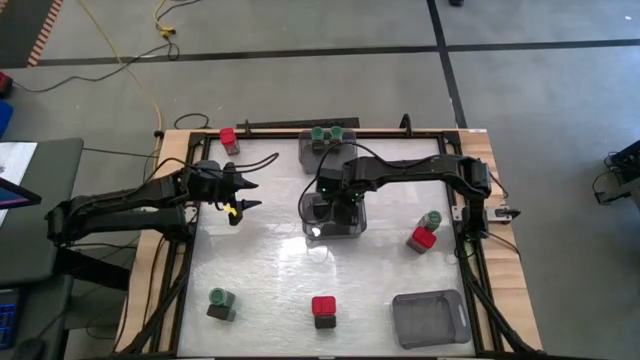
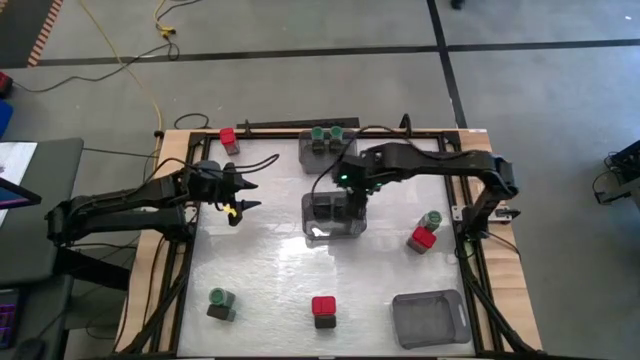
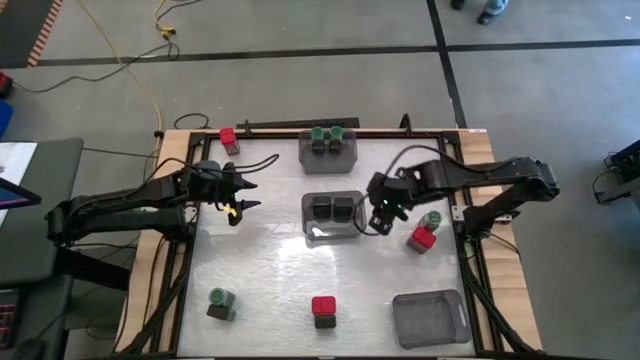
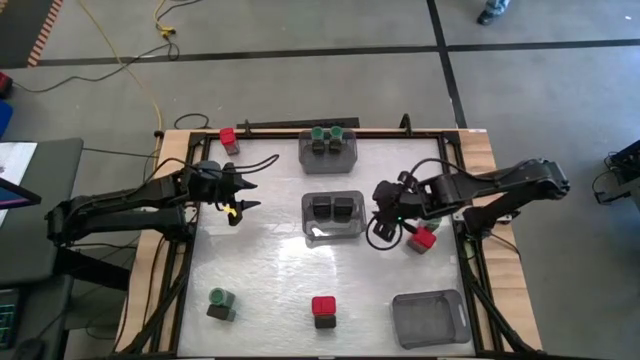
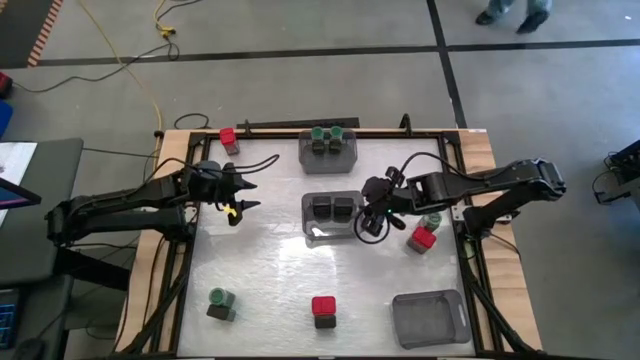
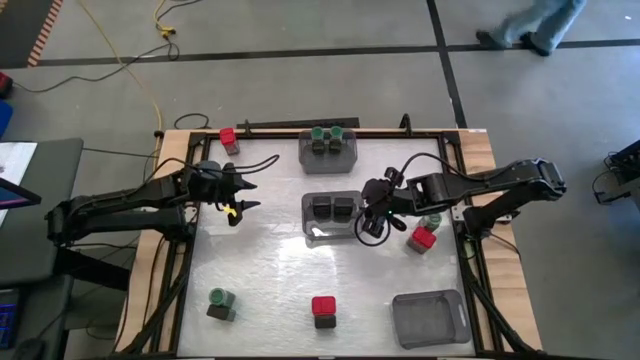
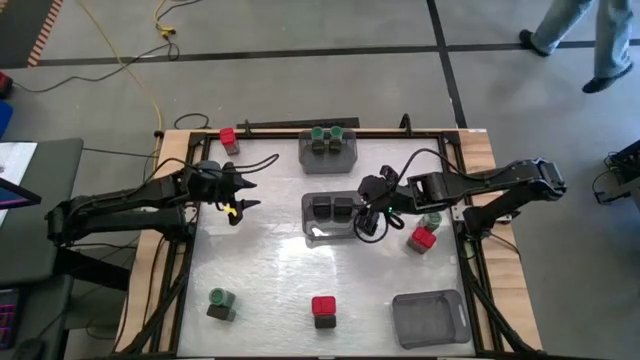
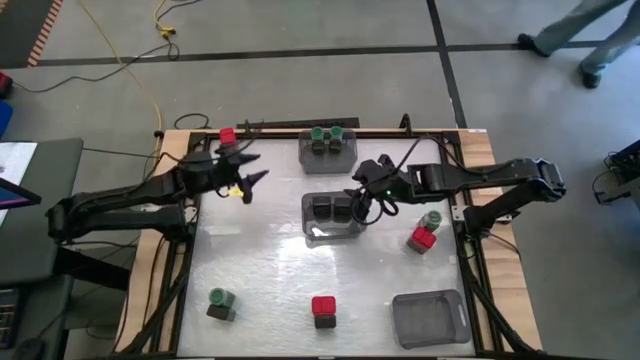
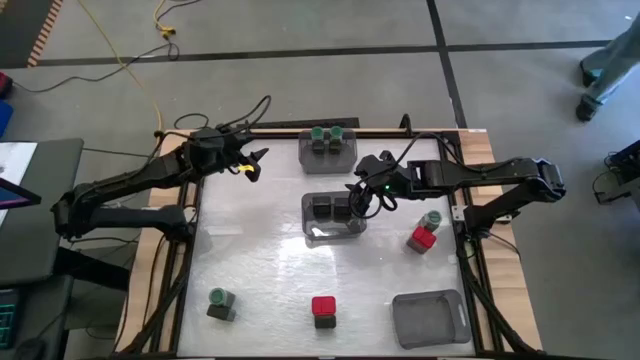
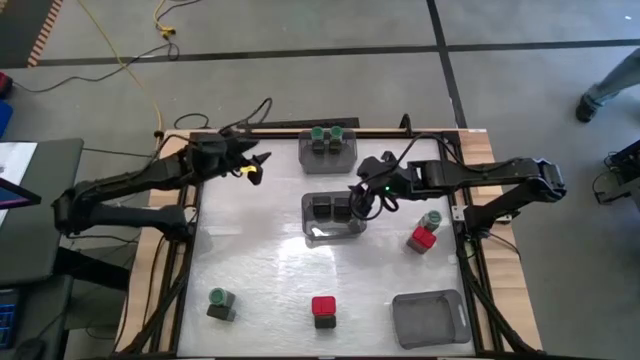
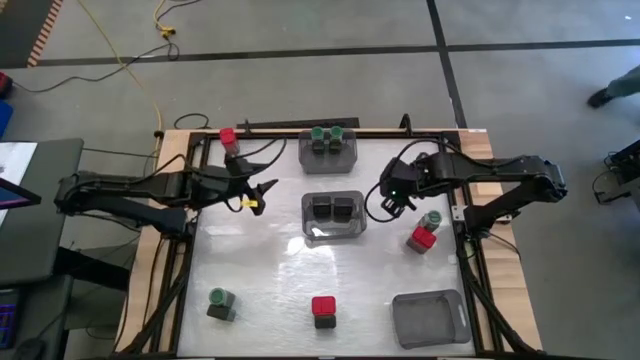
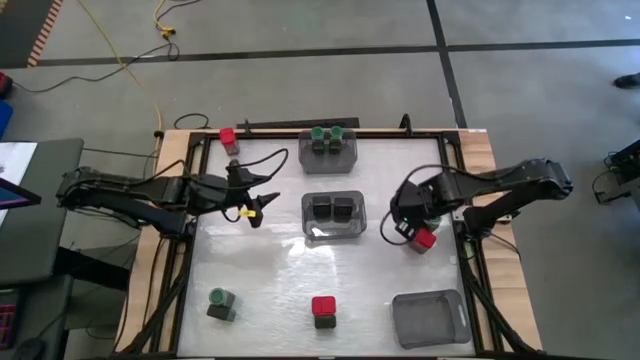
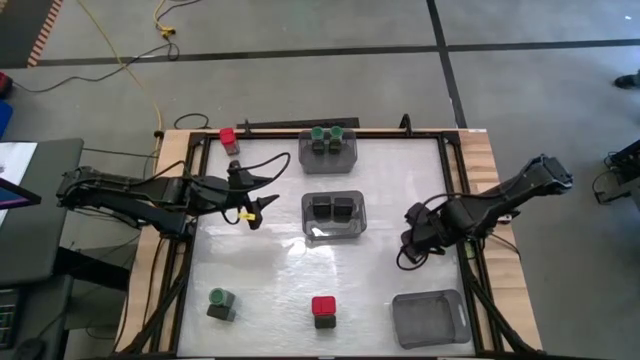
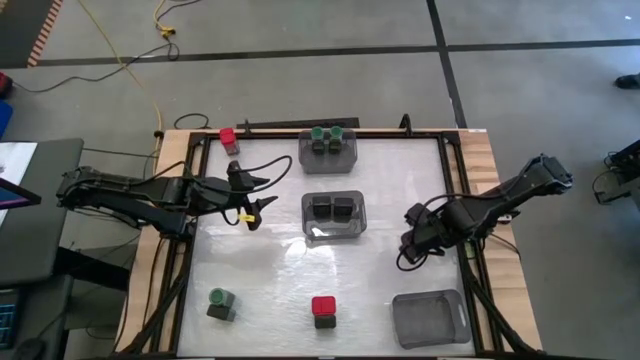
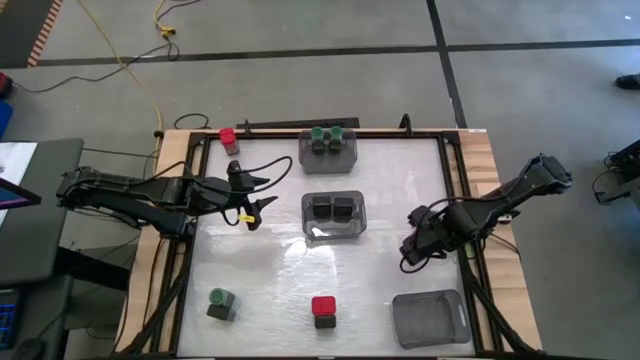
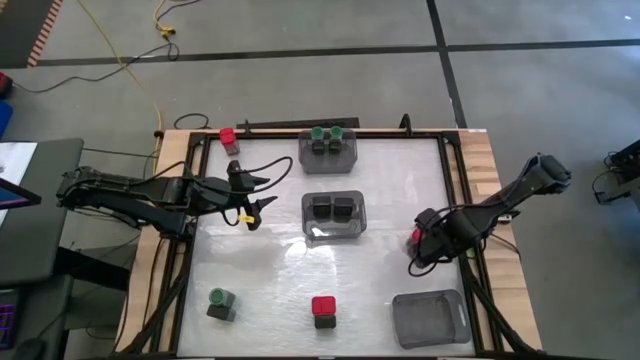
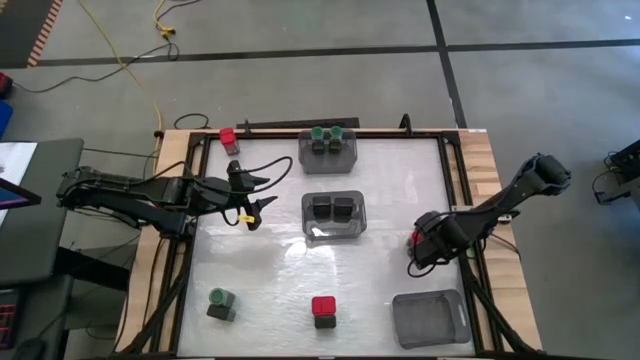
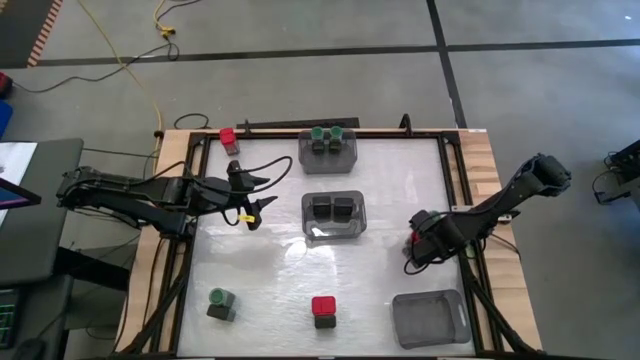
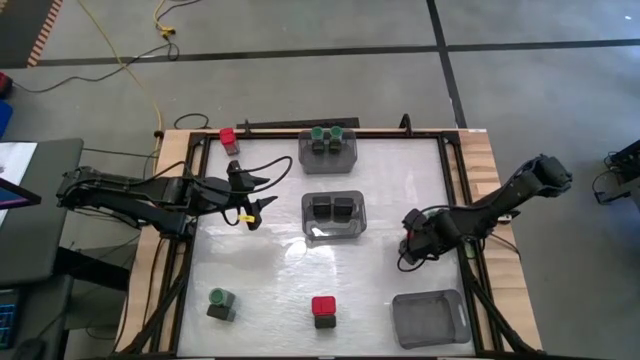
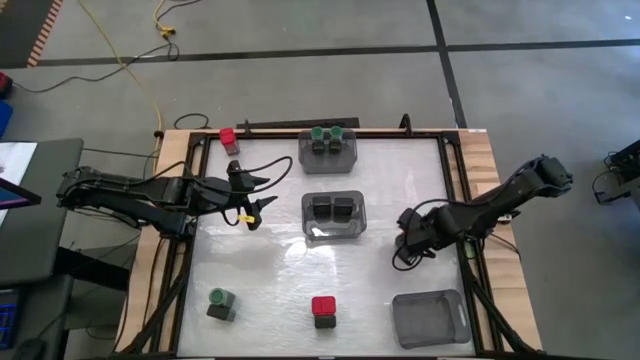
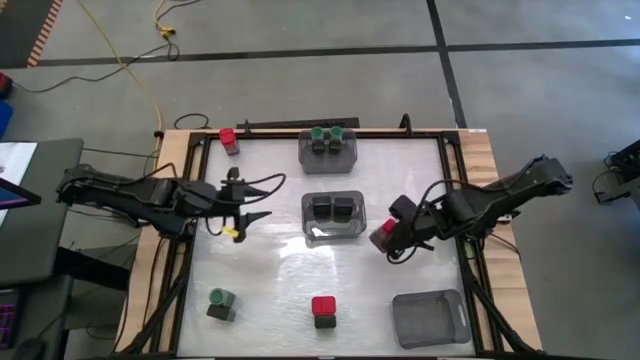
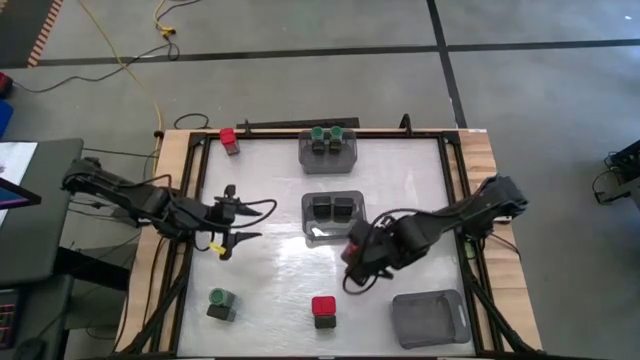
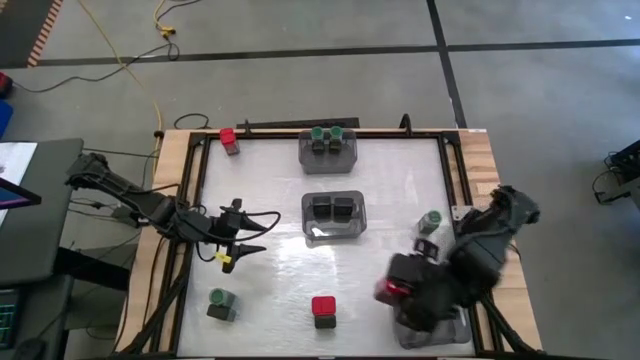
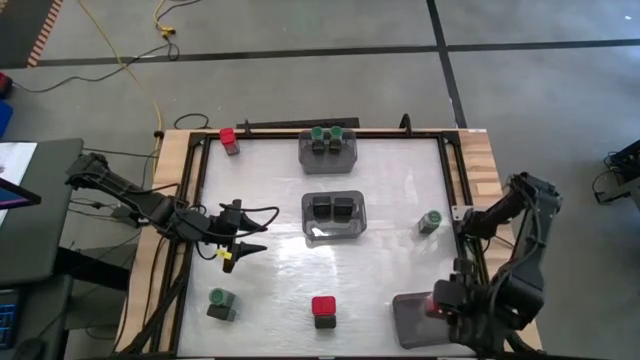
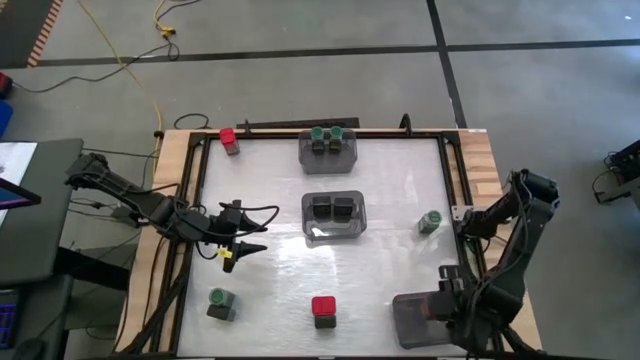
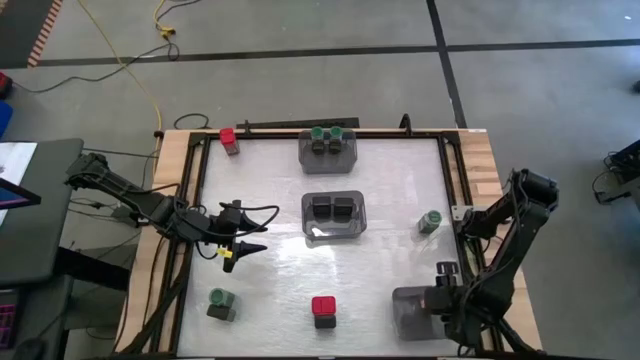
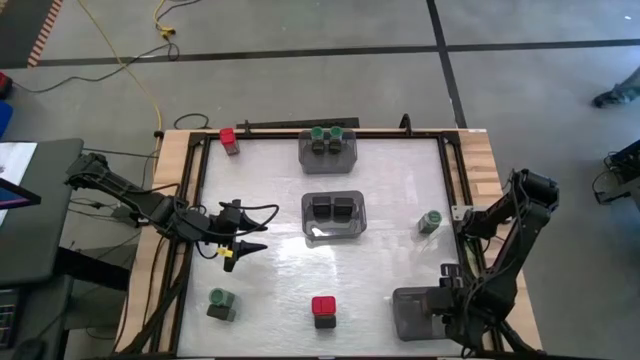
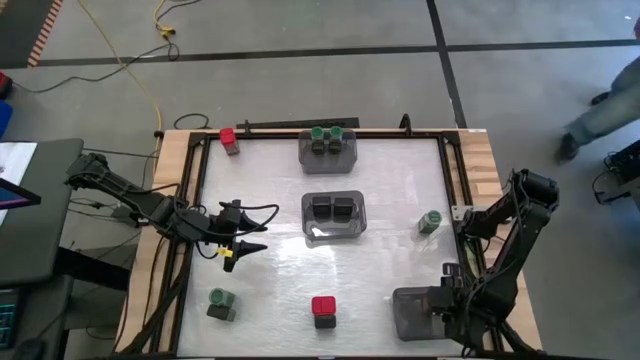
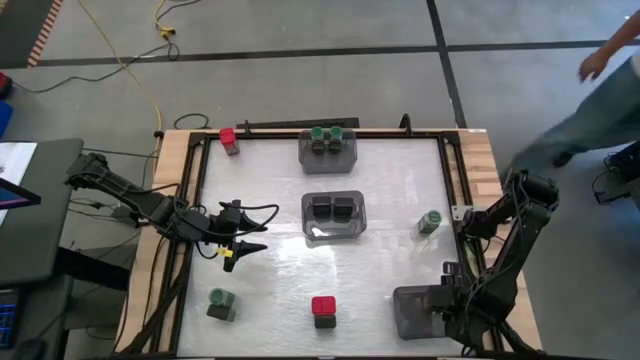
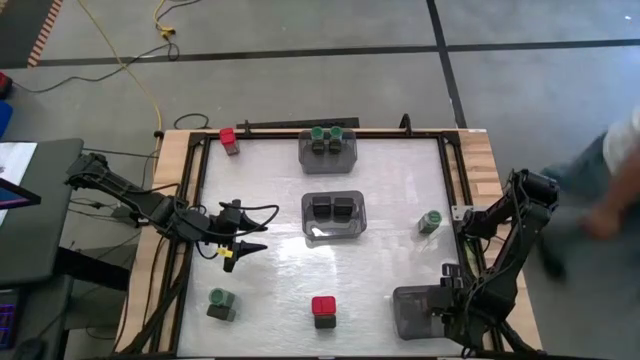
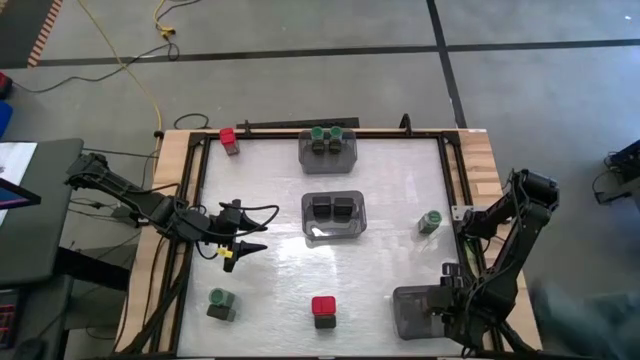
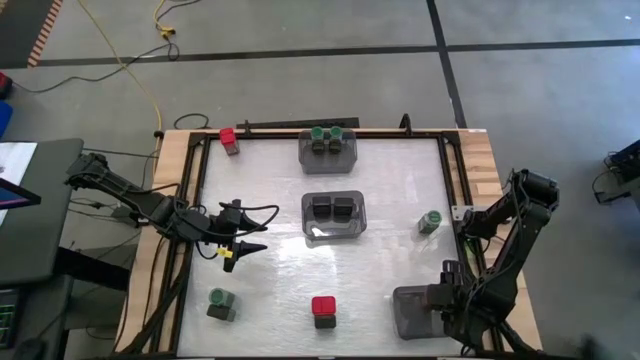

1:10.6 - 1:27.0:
Task: Sort spices by type
Put the red seasoning can into the bottom black bin

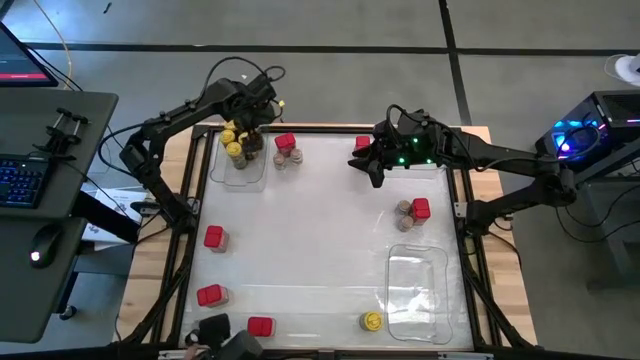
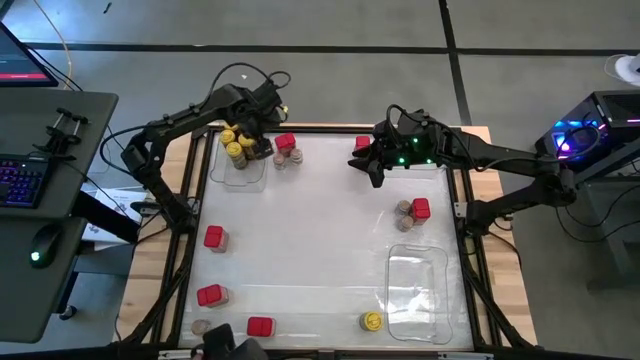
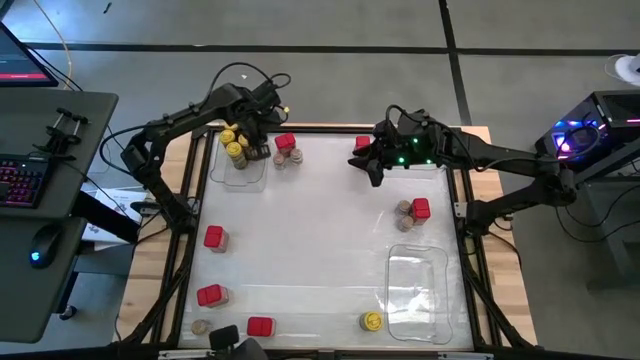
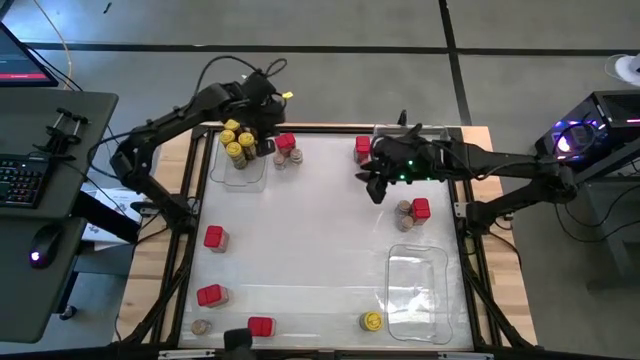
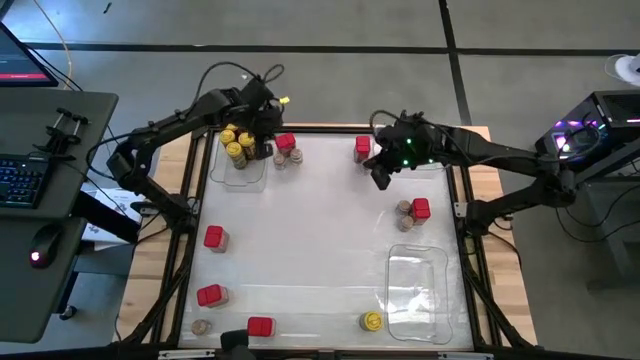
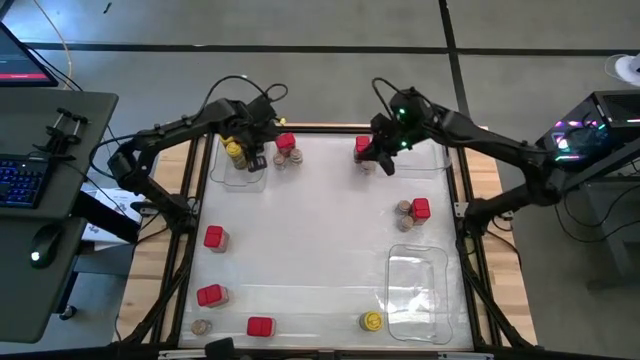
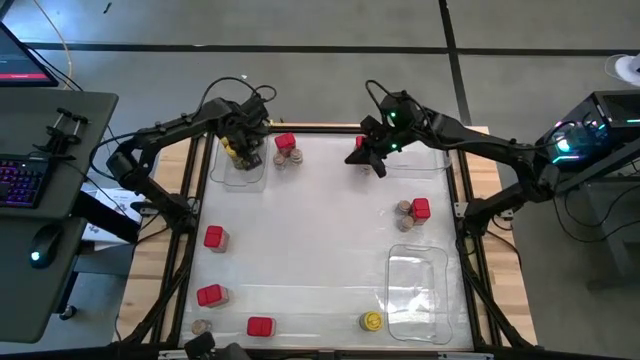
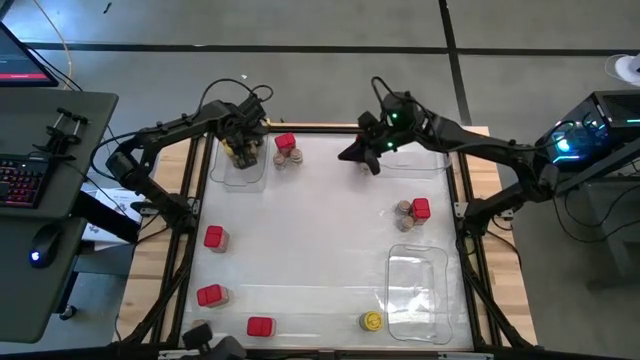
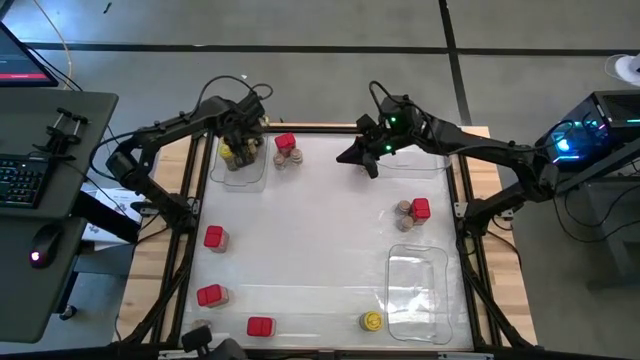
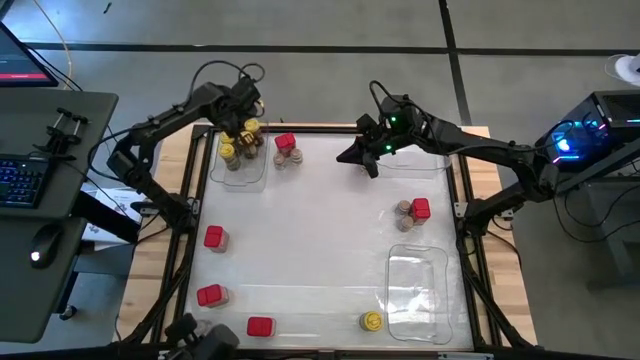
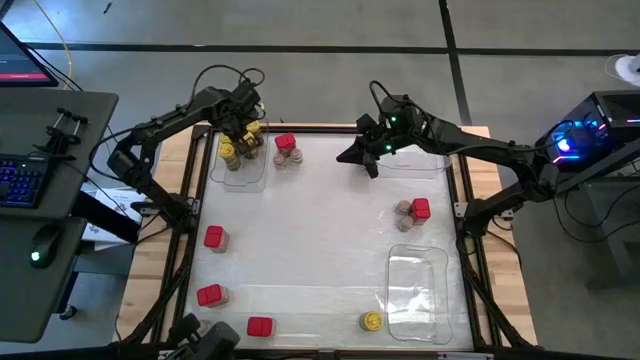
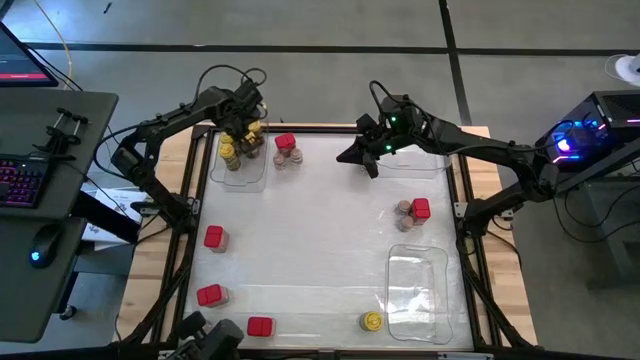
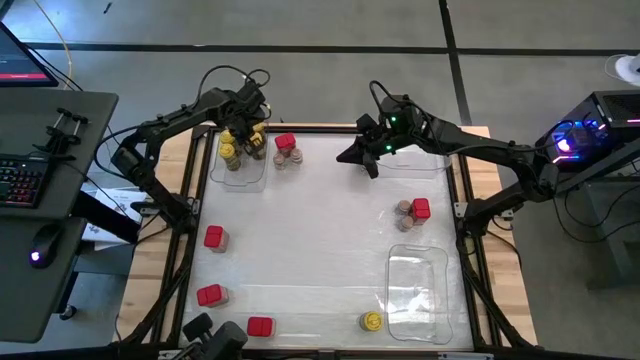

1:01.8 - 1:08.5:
Task: Sort spices by type
Adjust the yellow seasoning bottles in the top left transparent bin
